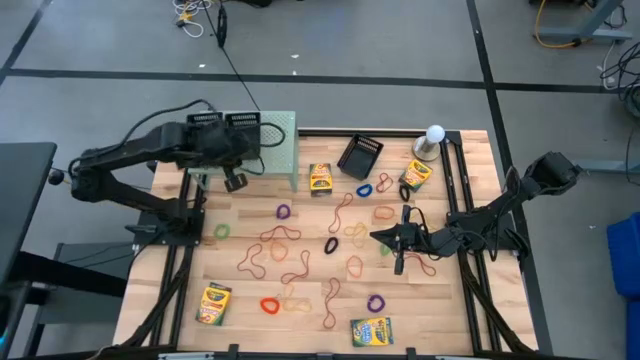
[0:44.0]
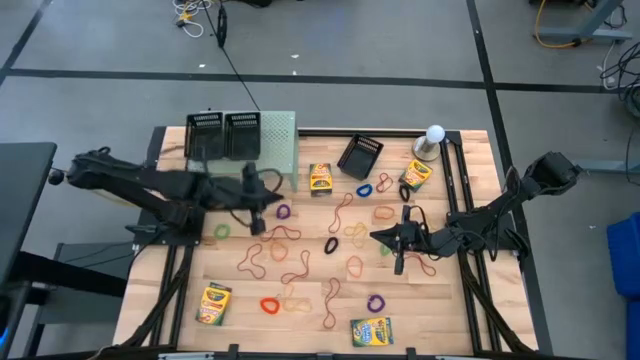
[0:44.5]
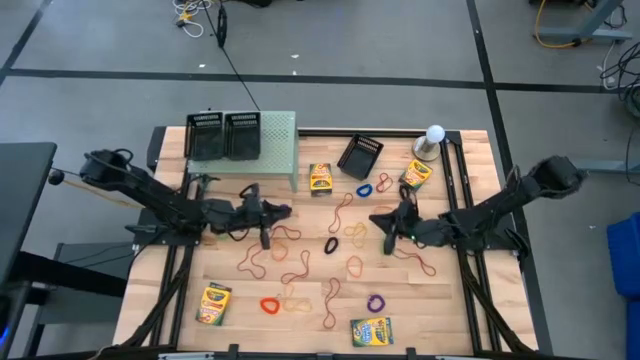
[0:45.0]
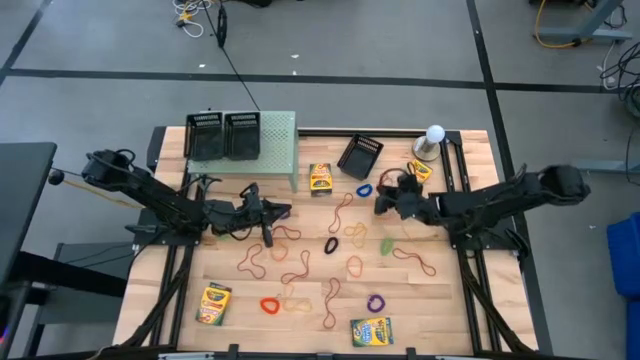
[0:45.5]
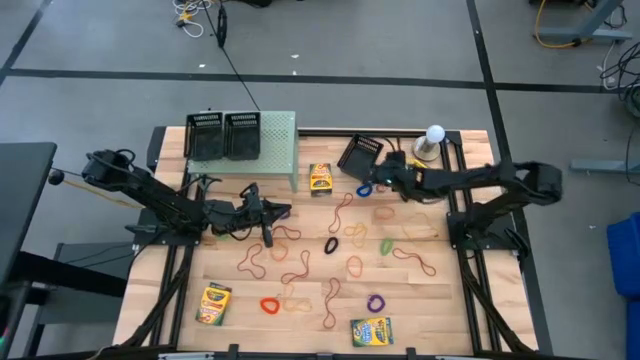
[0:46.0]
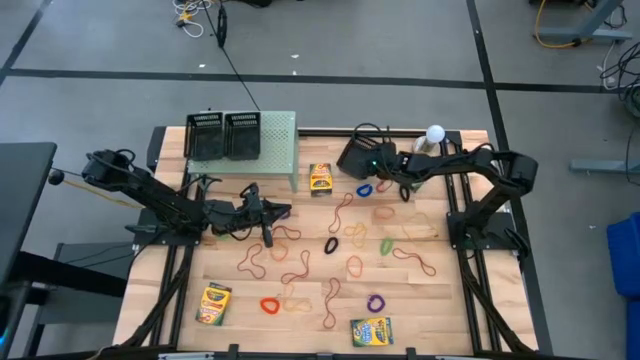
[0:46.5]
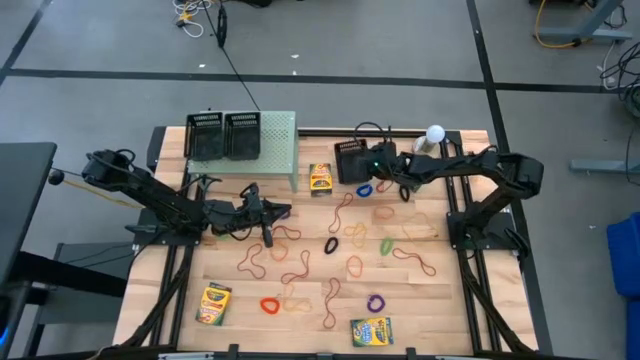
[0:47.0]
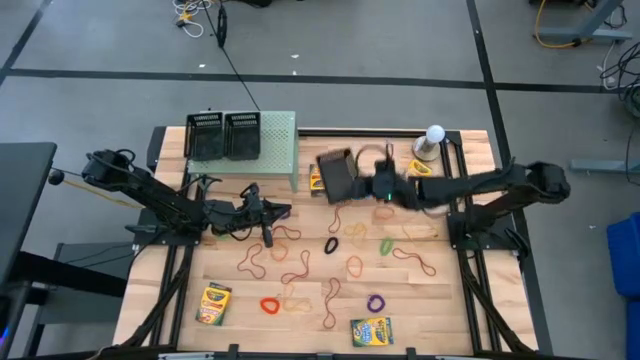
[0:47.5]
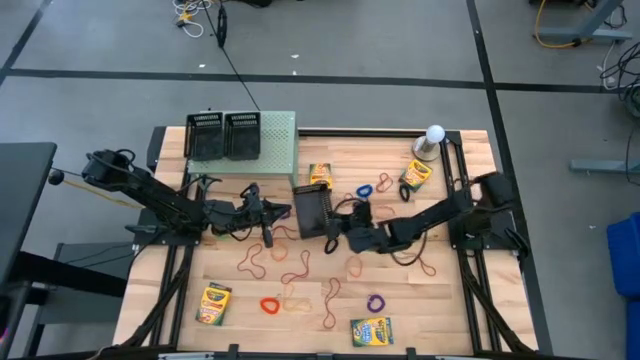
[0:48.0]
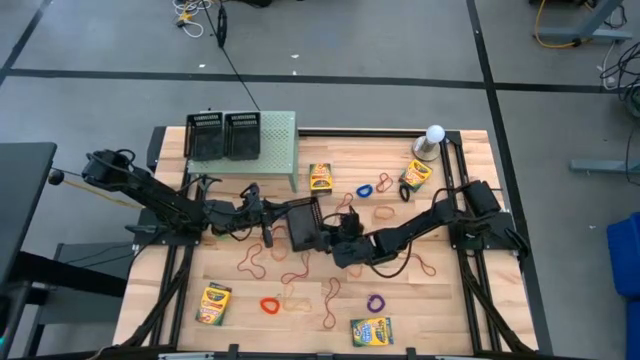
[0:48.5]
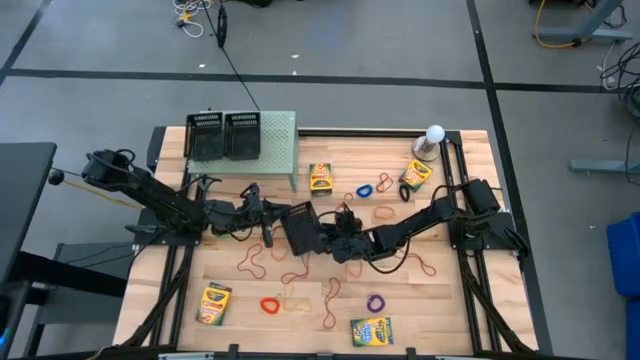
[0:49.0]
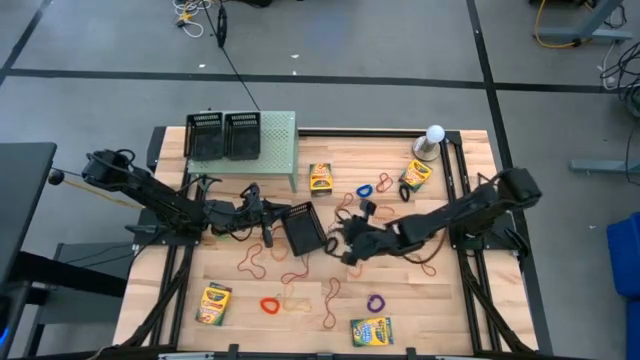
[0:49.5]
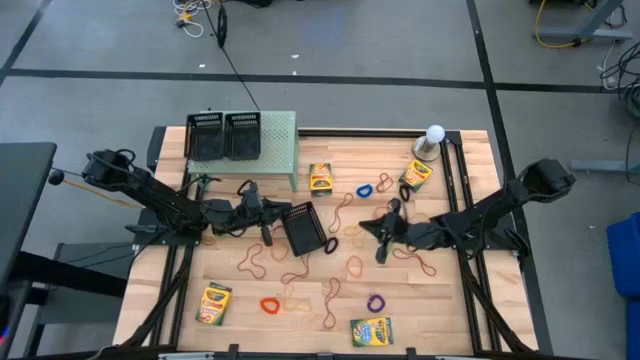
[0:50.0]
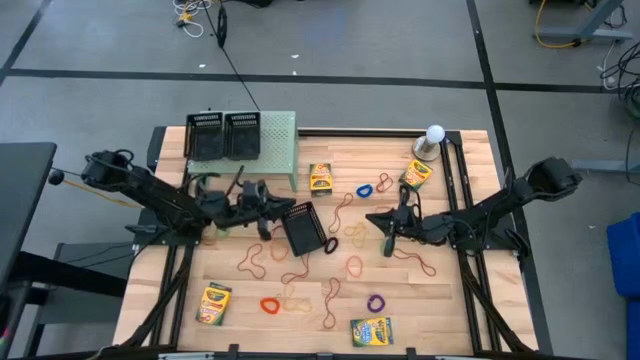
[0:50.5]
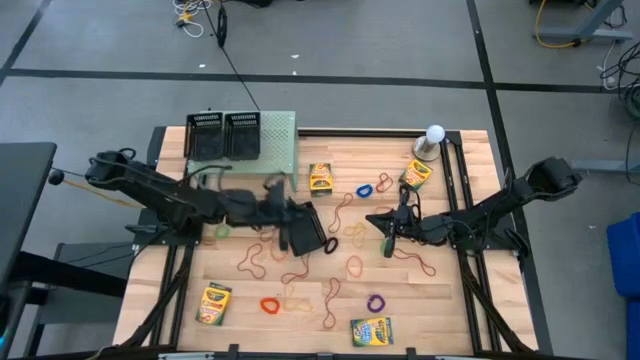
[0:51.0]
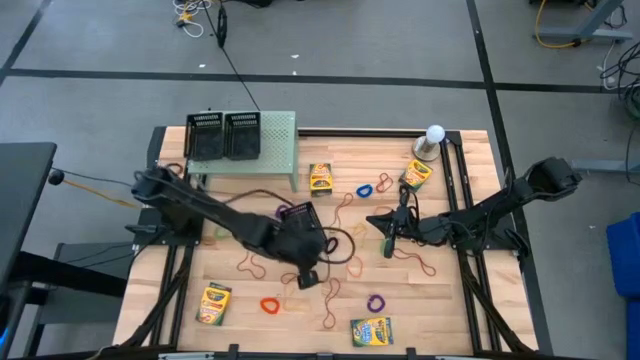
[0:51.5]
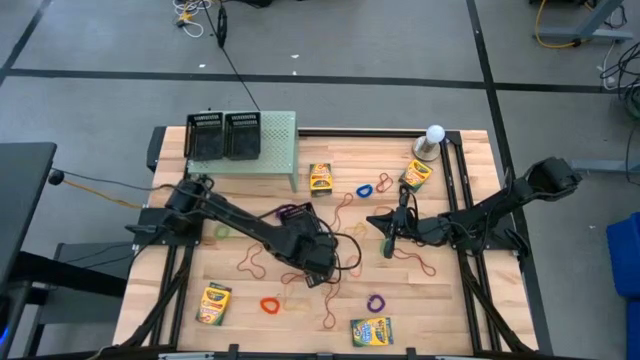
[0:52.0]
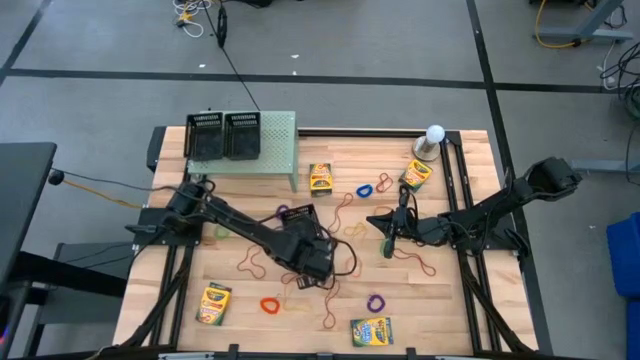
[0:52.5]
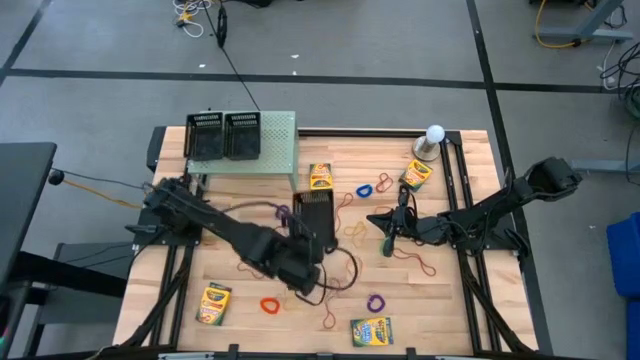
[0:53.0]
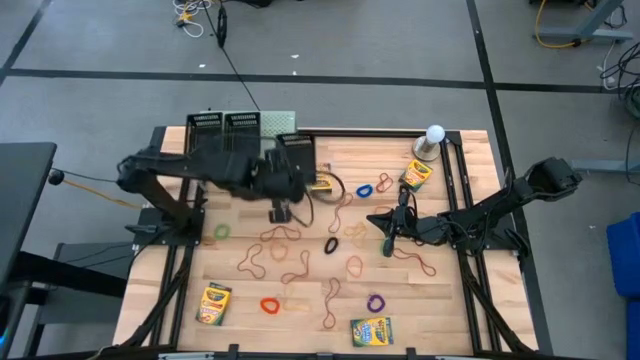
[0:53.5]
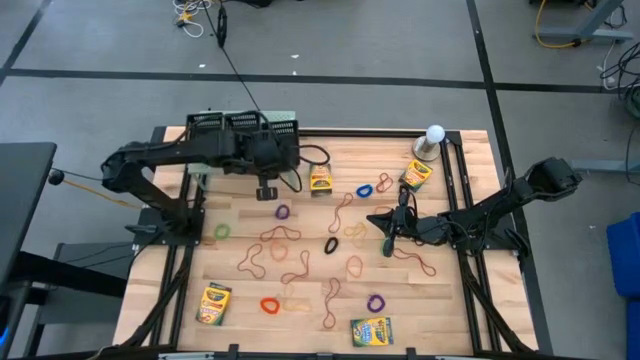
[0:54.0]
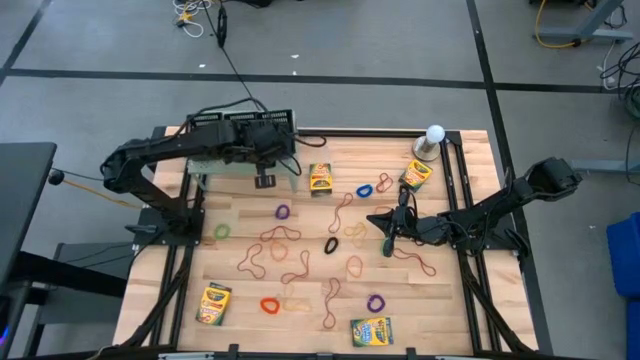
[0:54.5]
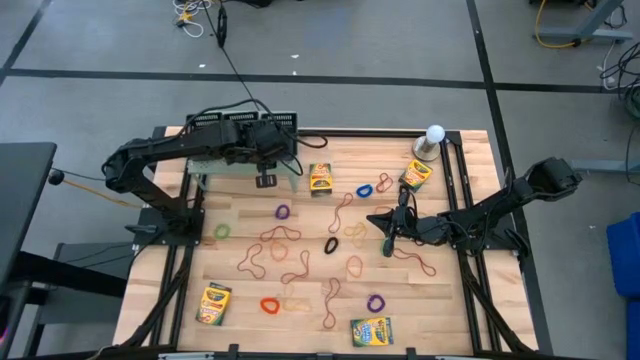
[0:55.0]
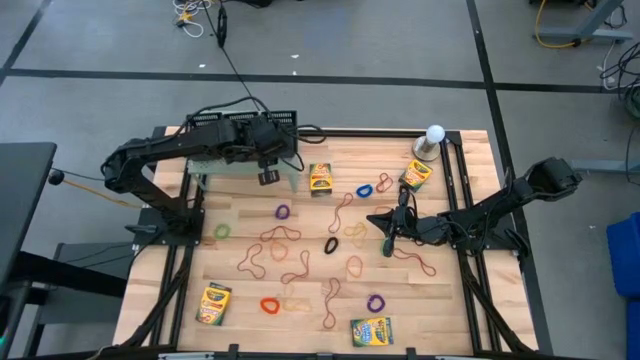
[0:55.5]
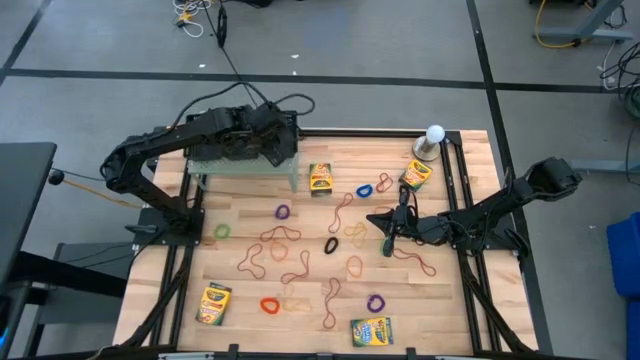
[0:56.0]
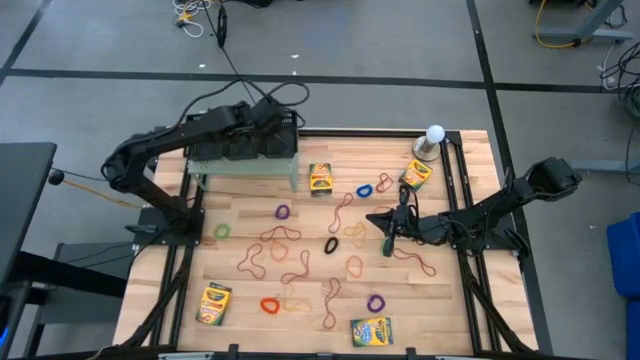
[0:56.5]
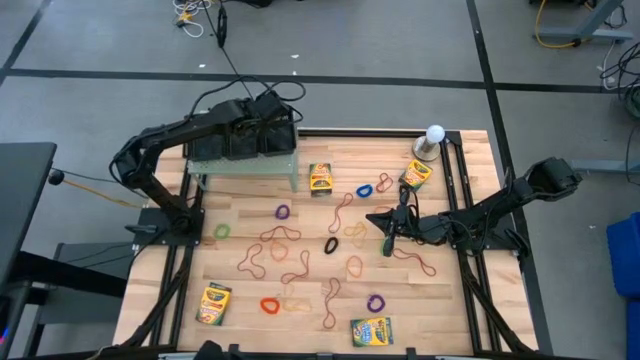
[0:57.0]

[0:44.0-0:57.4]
Task: Pick & Place Office Desk Supplies
Put the black bin on the shelf

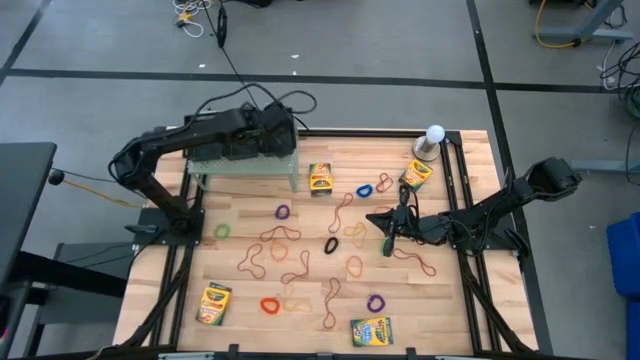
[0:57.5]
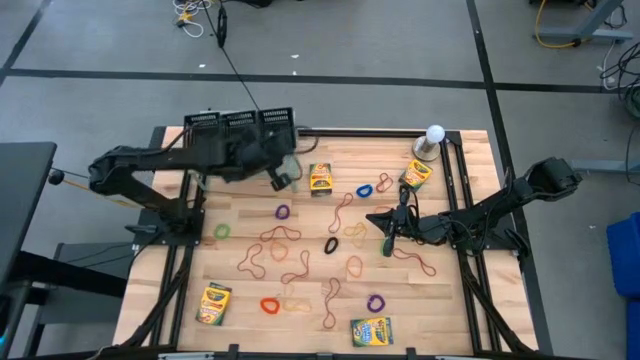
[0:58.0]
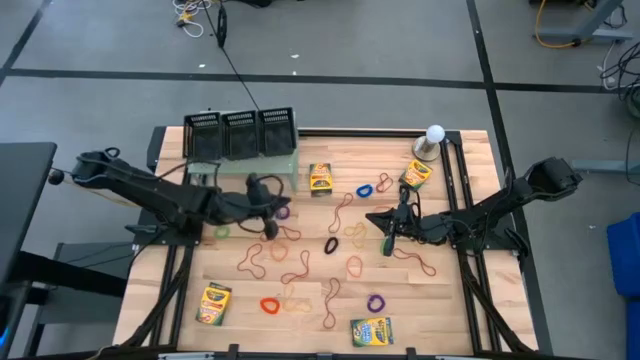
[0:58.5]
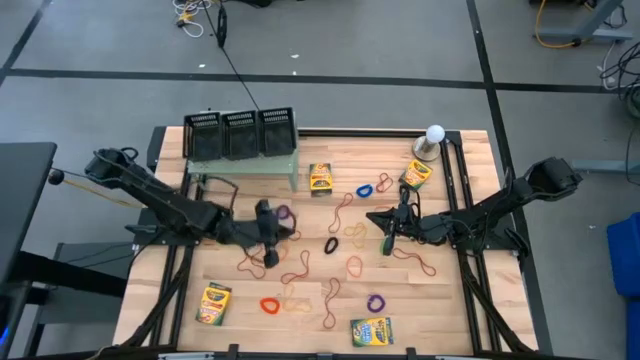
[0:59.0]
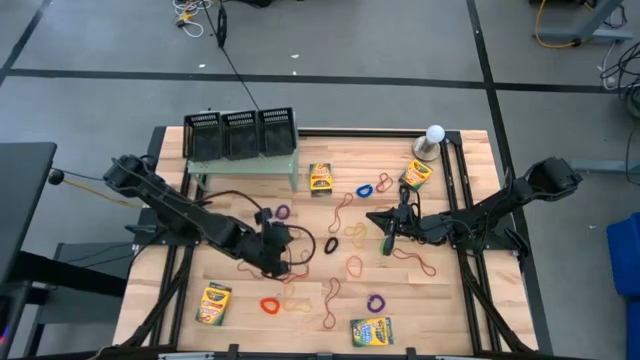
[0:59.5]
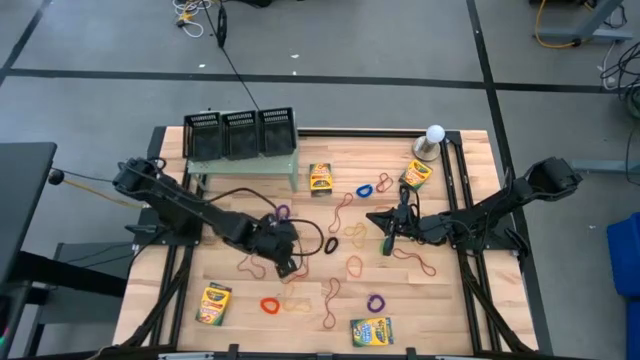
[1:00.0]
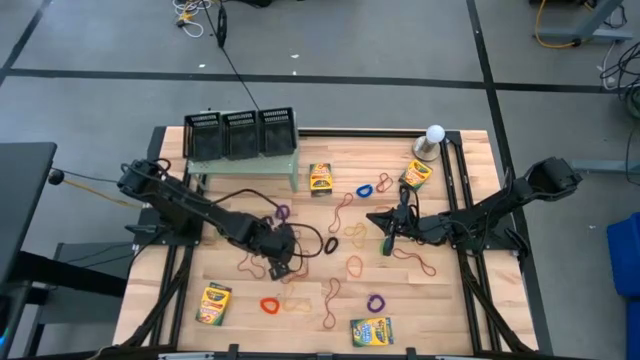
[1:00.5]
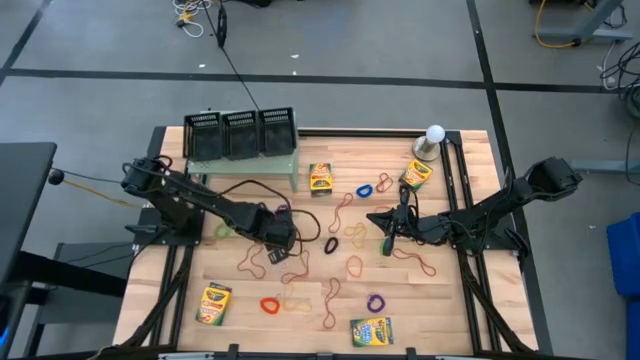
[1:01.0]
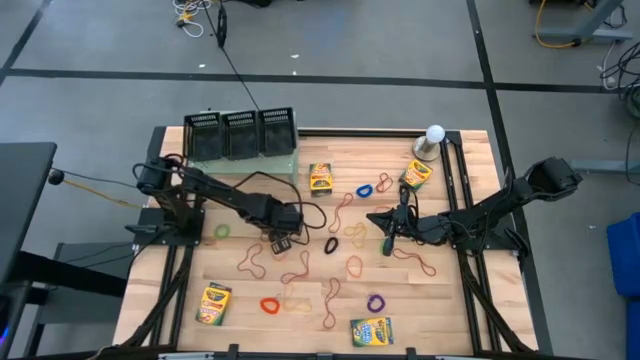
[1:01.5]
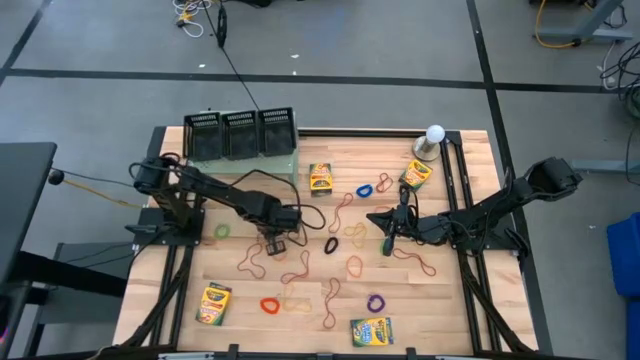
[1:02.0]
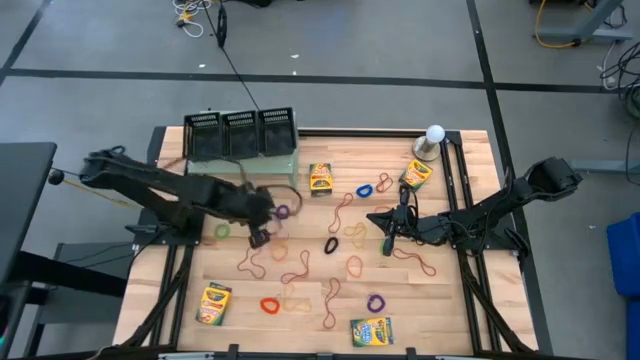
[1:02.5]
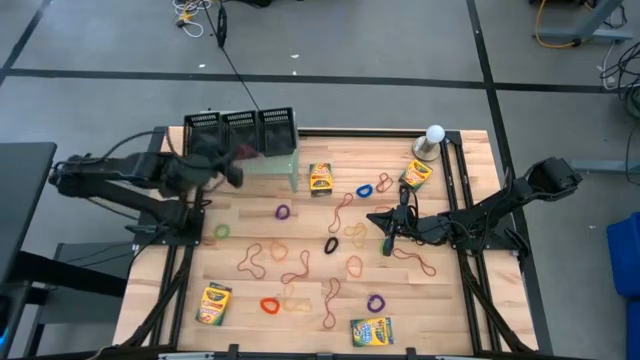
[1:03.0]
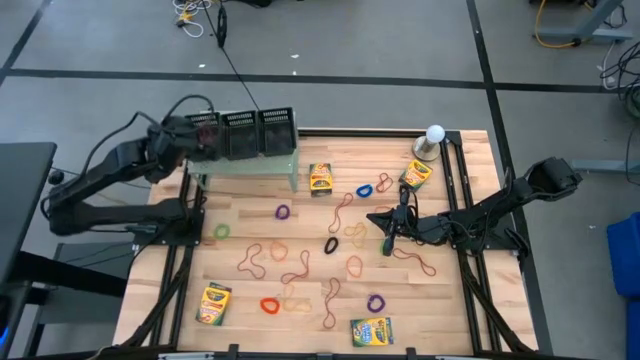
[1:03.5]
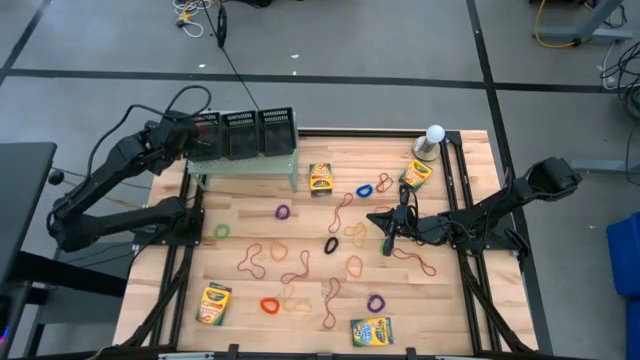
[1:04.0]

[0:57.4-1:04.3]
Put the red rubber band into the left black bin on the shelf
